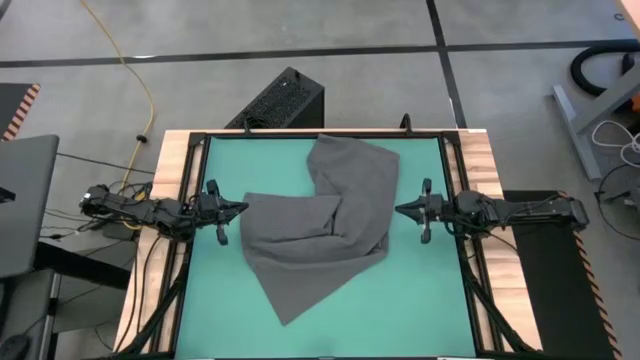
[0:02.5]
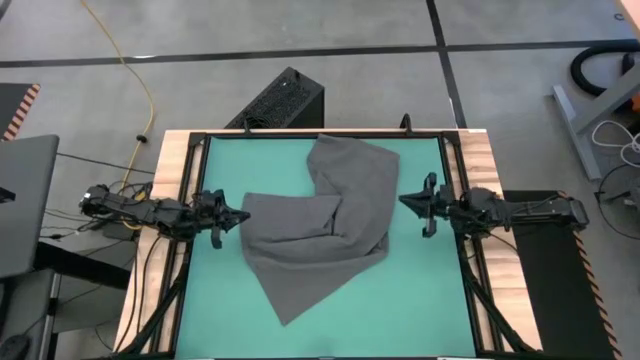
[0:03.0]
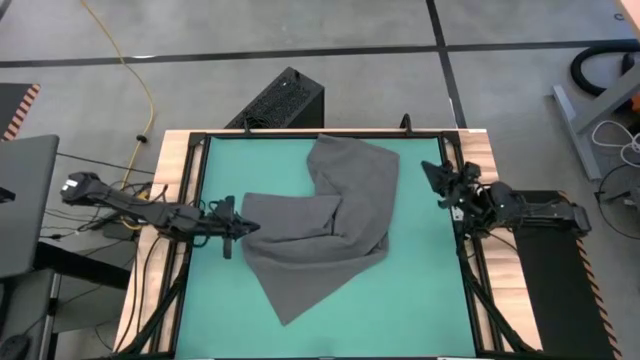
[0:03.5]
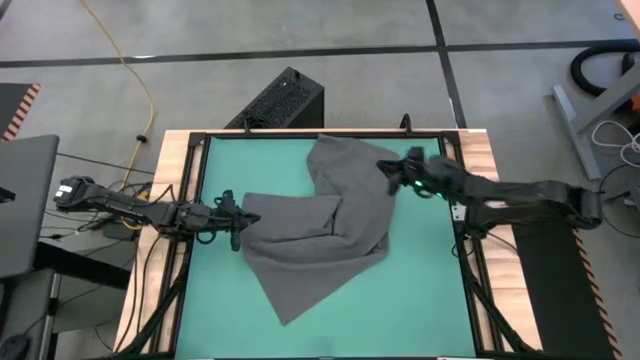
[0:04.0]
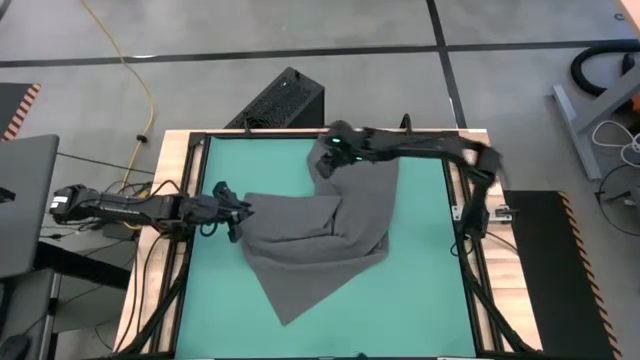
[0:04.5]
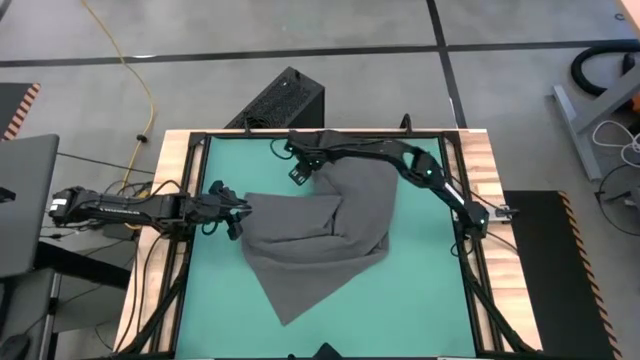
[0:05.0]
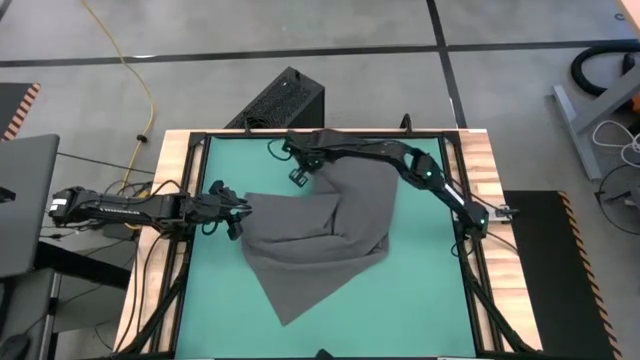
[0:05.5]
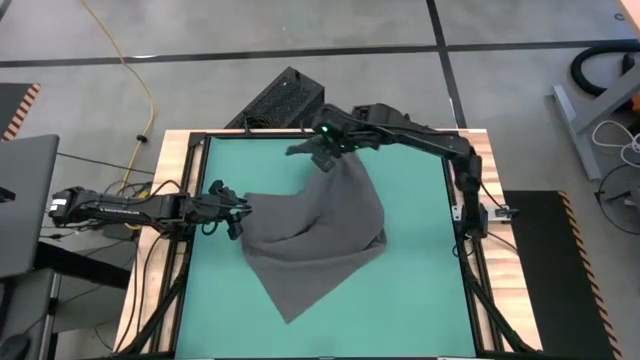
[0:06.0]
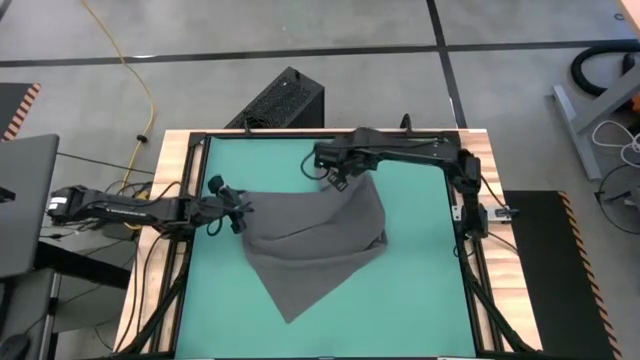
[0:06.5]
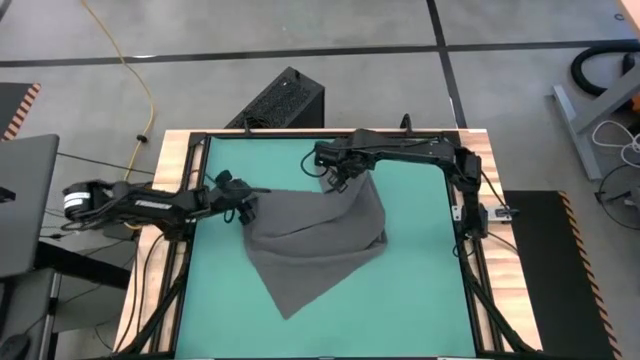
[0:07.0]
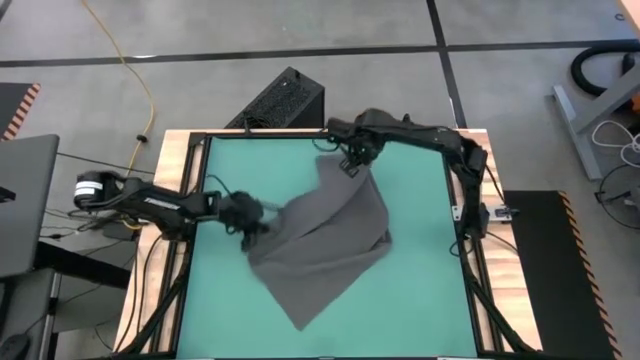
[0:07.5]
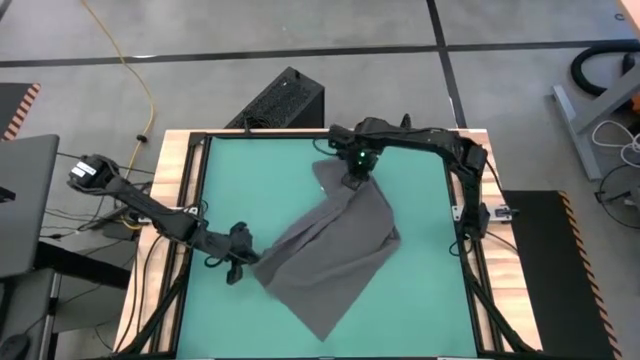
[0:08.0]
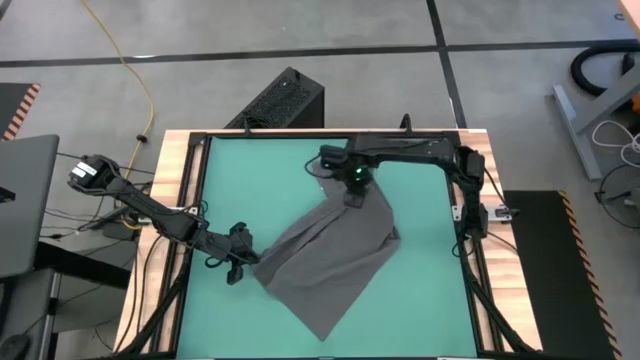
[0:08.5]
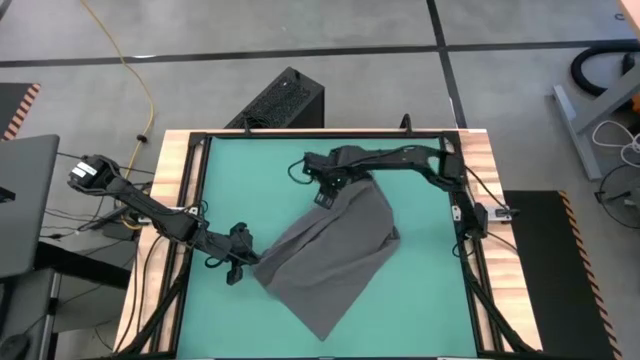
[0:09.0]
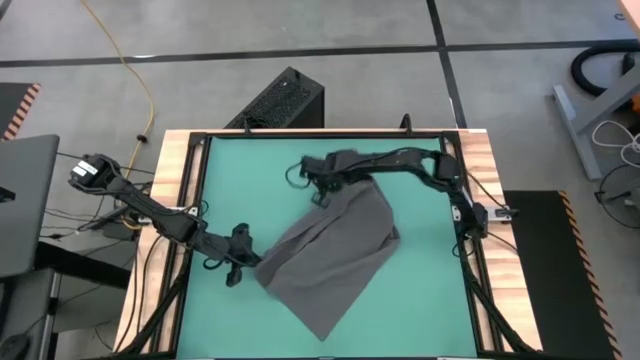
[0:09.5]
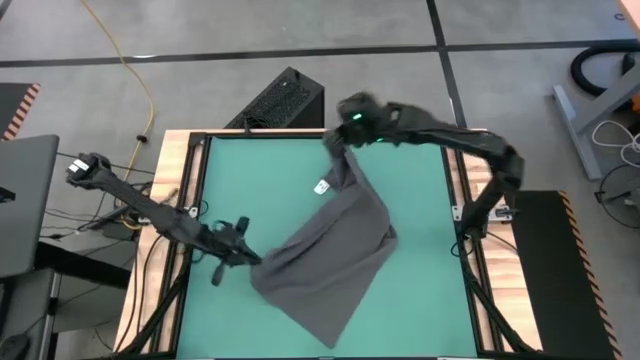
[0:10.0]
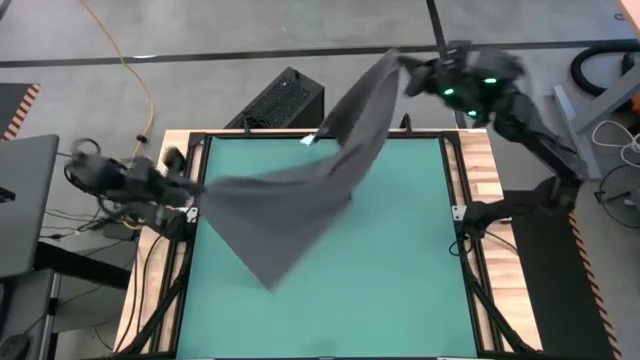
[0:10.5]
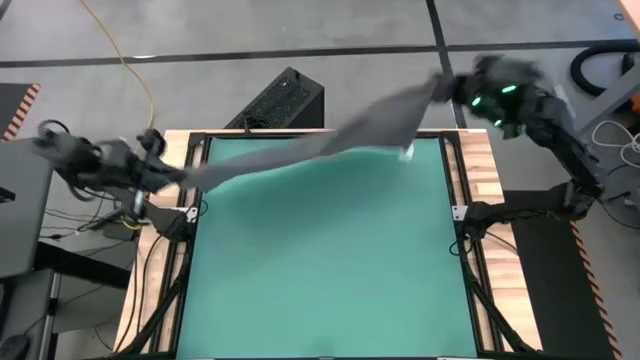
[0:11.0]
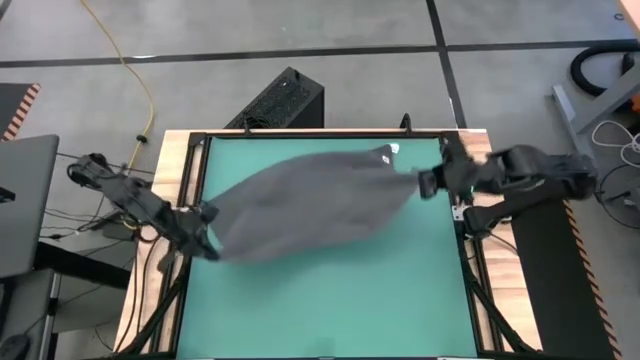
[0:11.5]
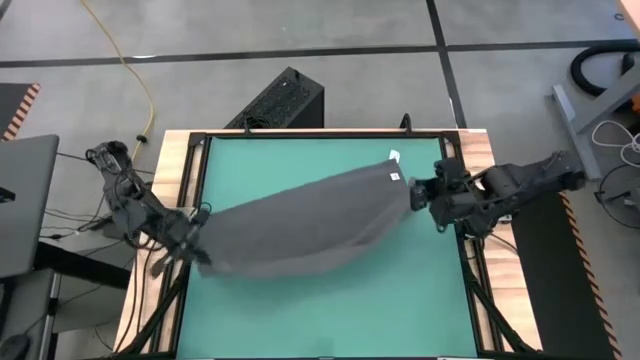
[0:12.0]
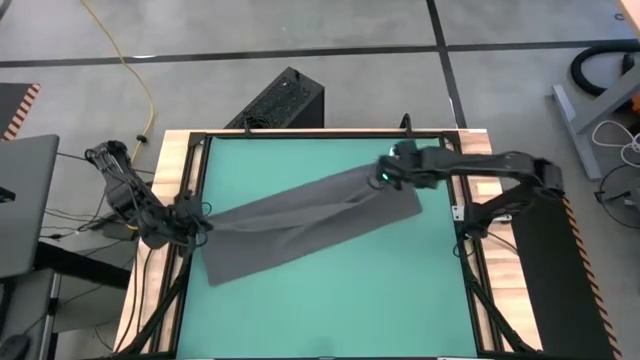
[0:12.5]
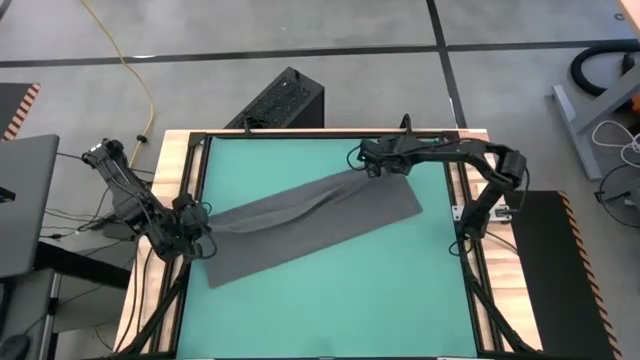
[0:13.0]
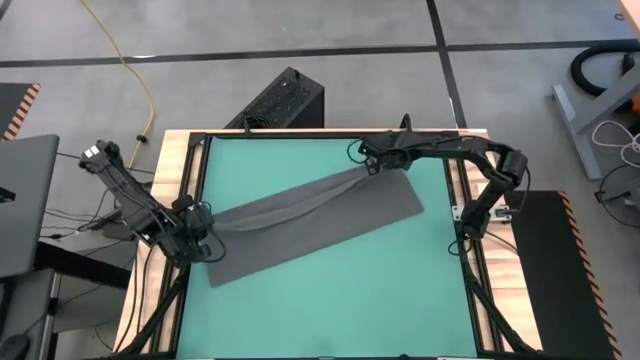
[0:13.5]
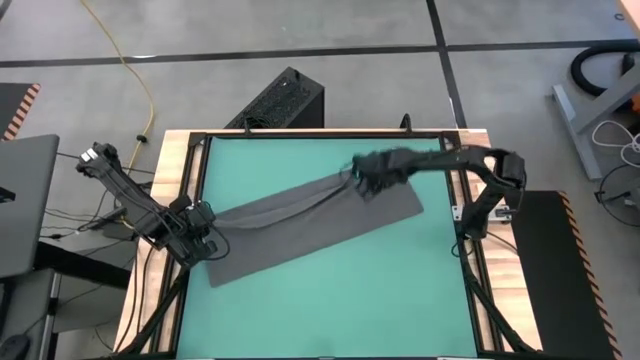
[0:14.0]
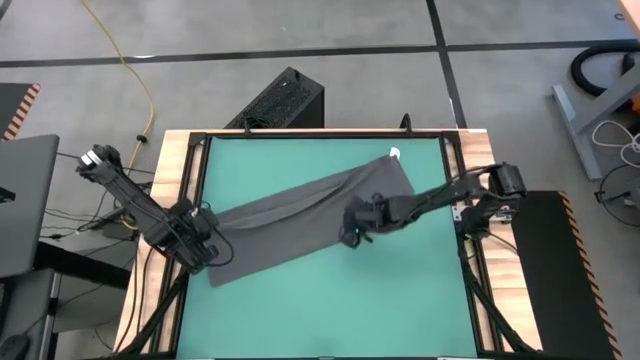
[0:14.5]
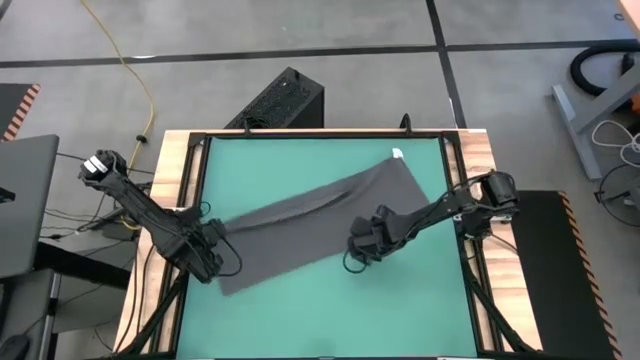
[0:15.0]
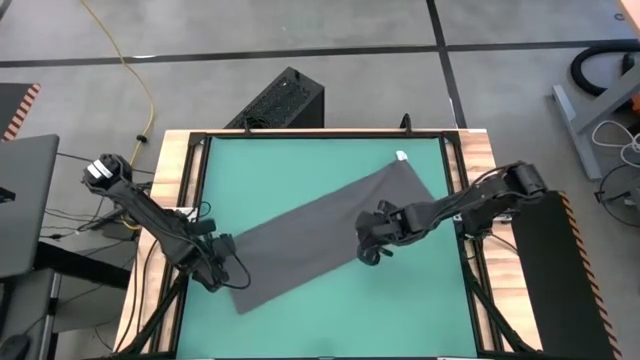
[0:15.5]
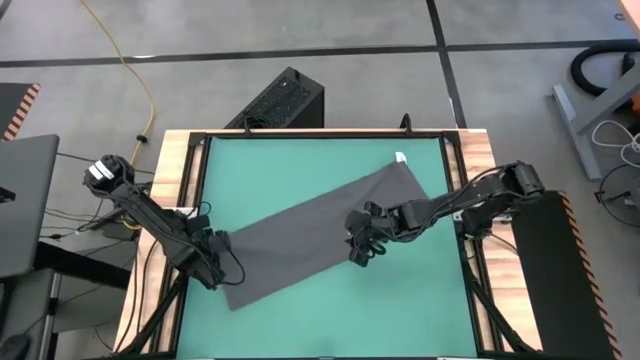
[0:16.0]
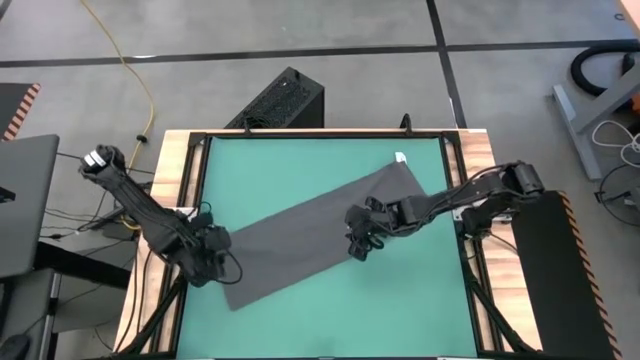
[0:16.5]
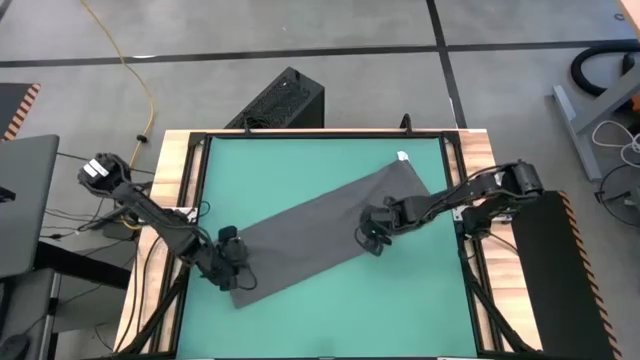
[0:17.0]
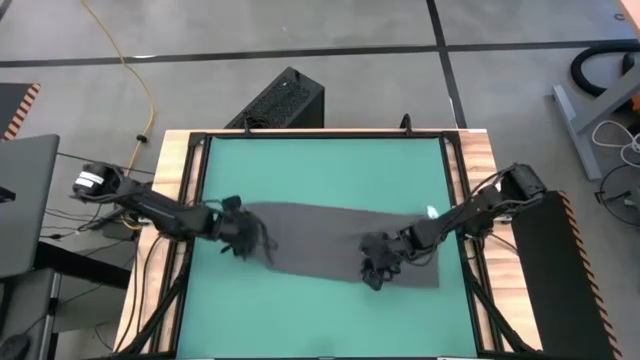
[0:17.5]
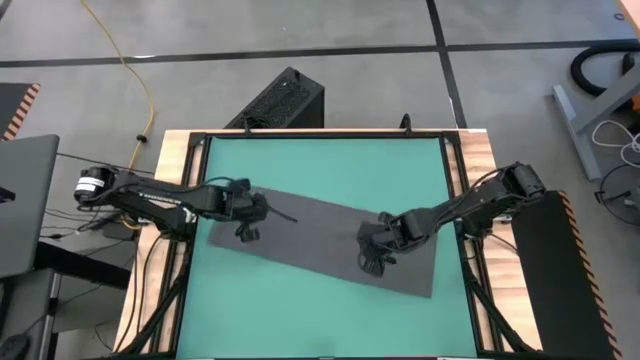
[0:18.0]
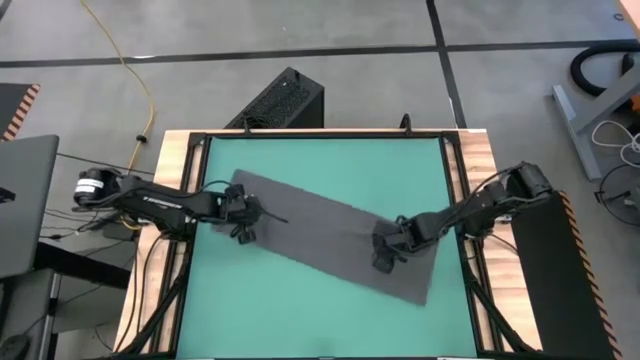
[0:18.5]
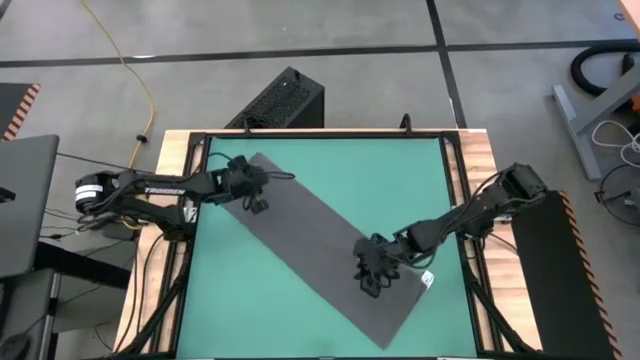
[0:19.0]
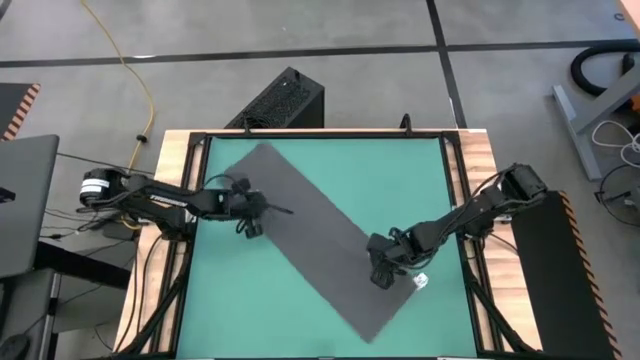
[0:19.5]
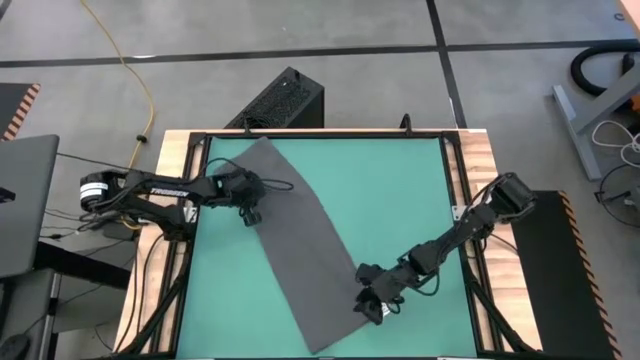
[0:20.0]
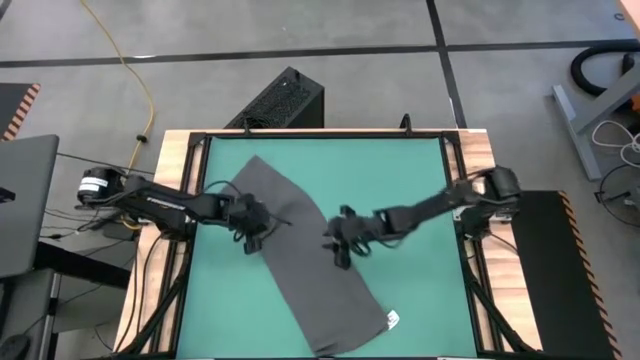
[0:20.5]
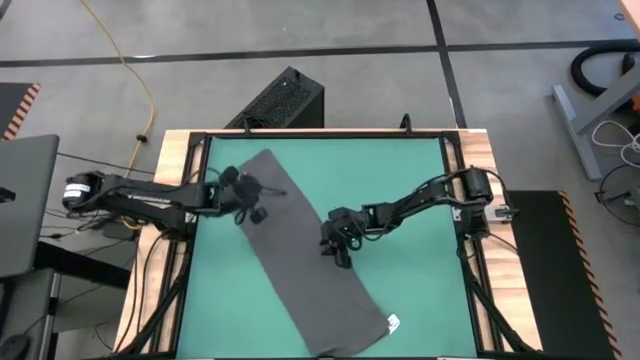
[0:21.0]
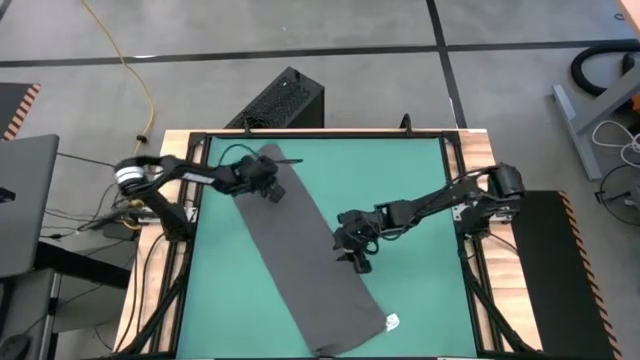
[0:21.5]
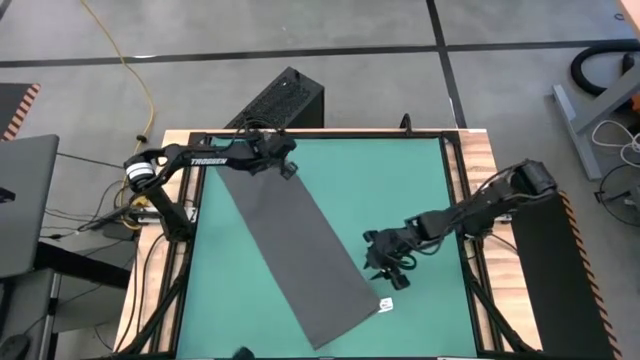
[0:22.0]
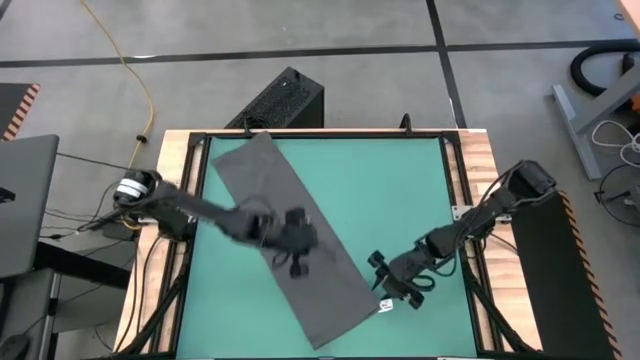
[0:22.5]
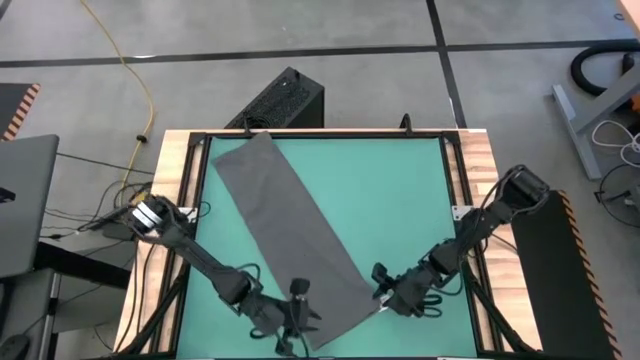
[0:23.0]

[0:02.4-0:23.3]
Task: Roll towel
Roll the black towel
